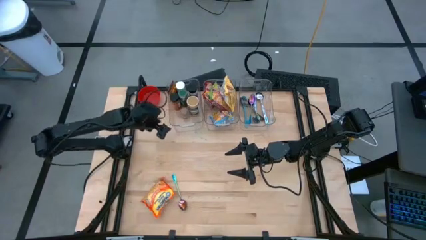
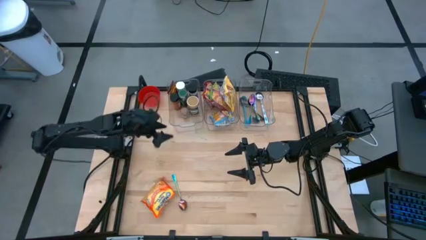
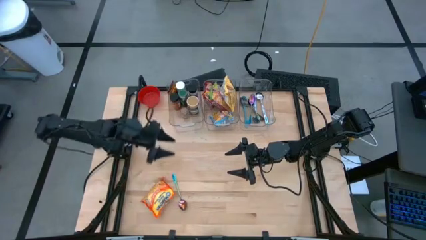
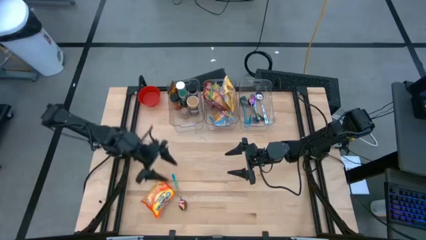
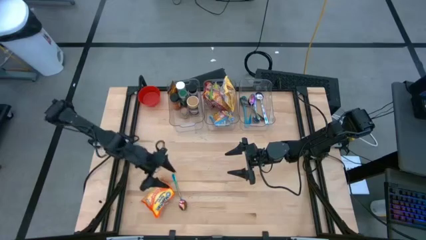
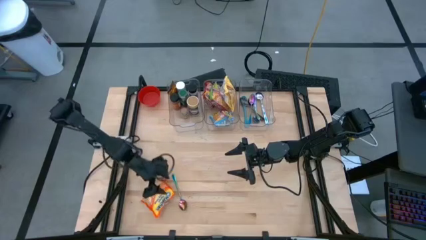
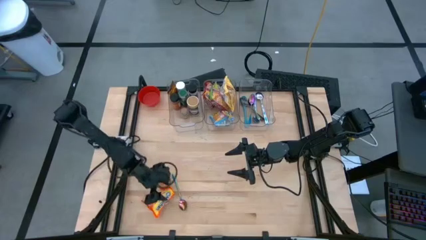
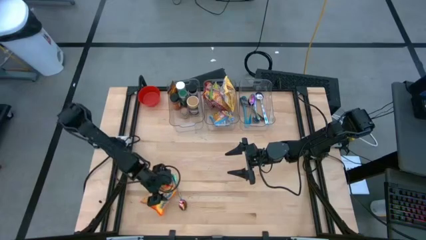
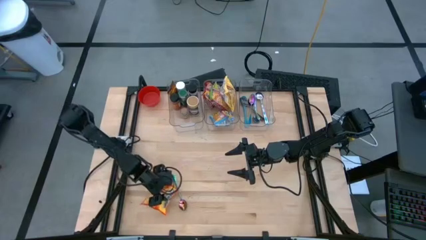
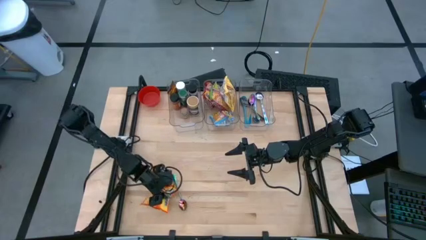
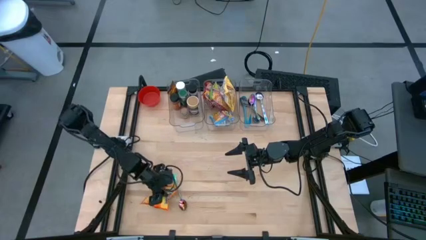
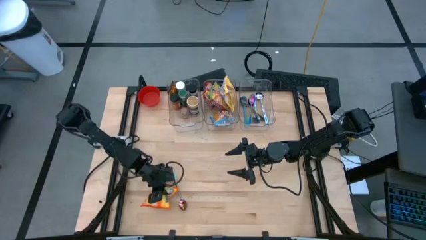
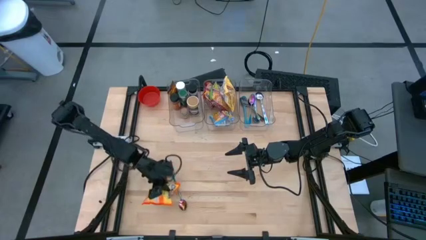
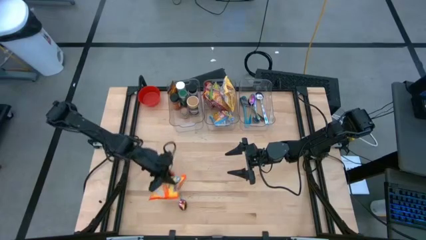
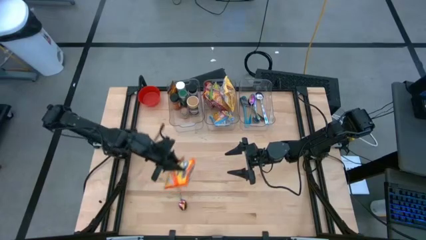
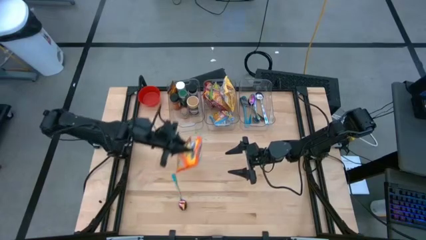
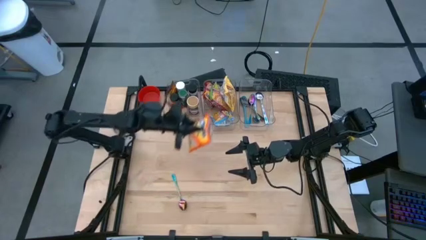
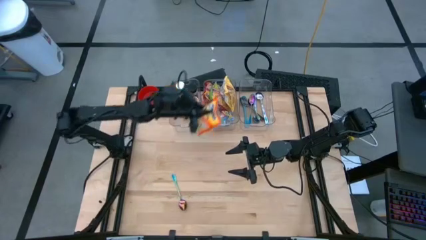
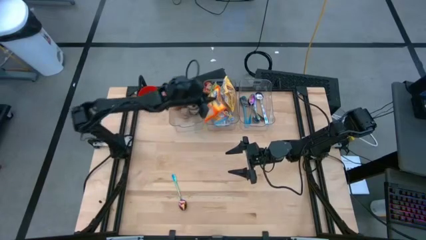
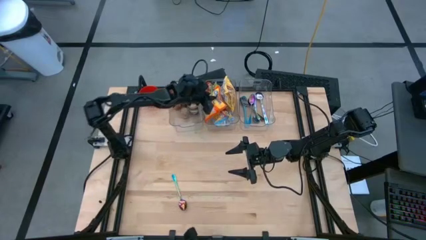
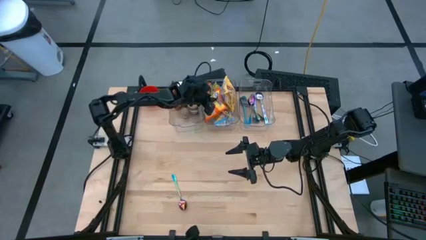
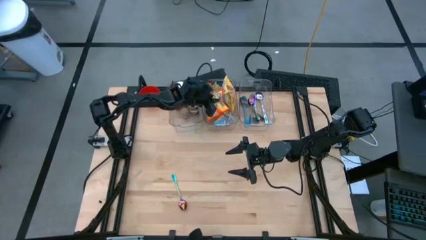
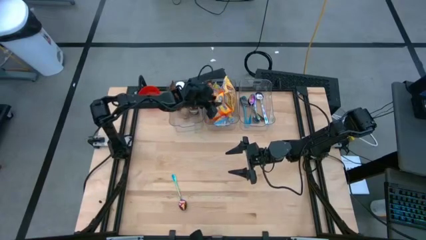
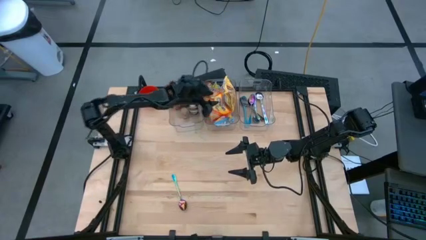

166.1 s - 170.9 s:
Task: Pick & Place Food Item
Put the orange noodle pack into the middle transparent bin

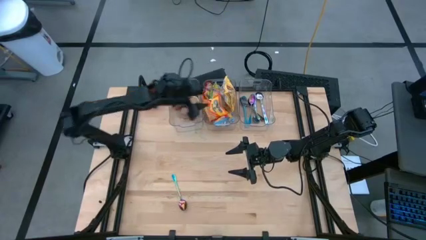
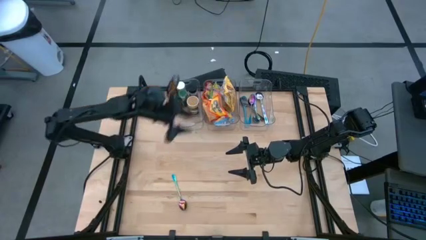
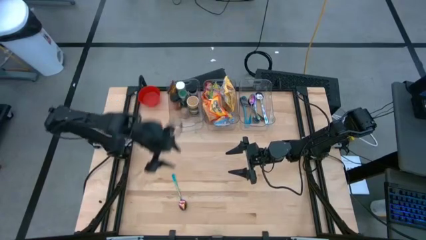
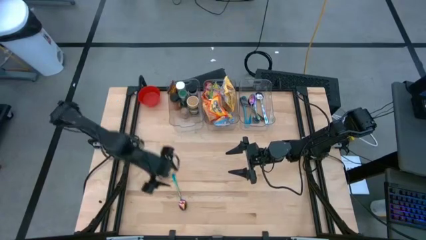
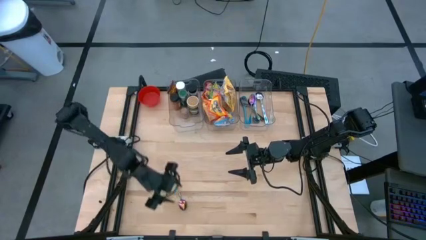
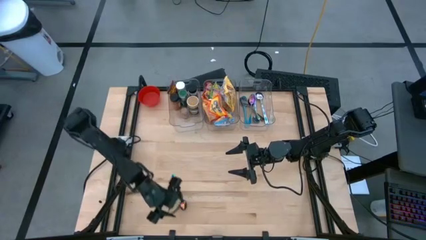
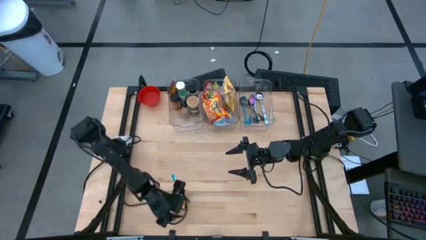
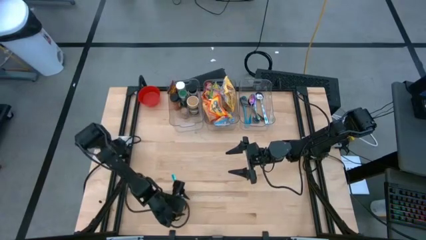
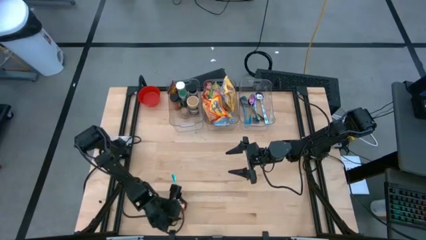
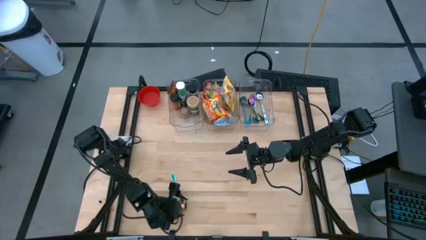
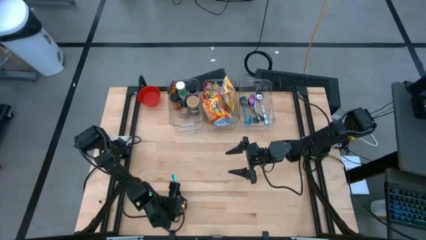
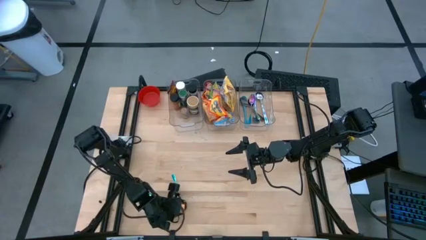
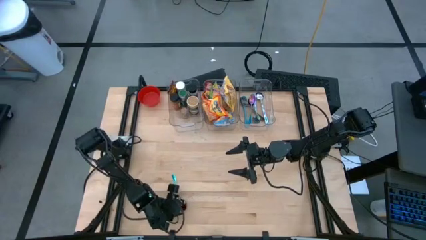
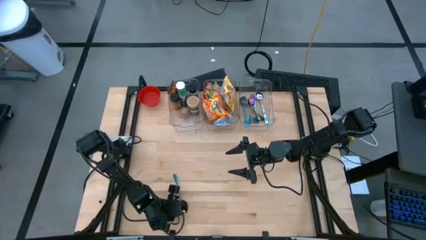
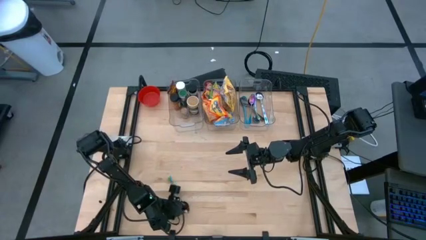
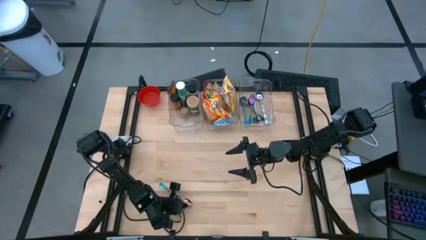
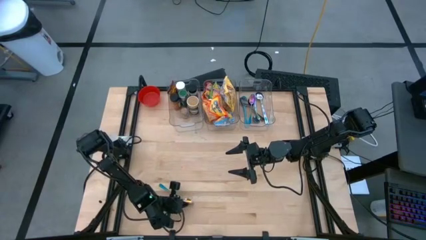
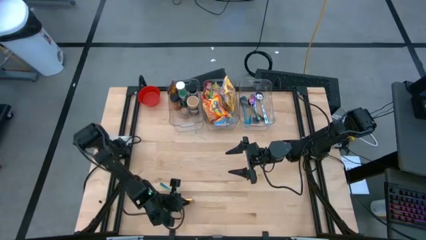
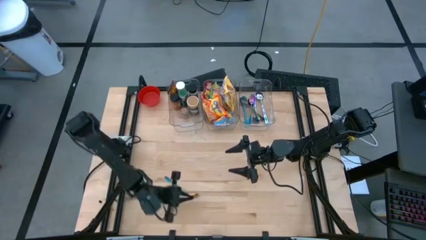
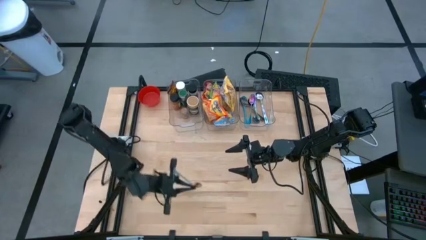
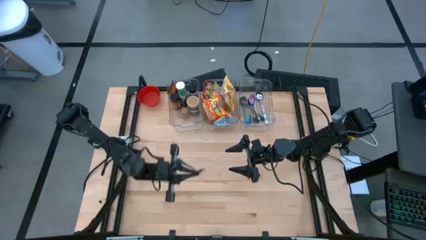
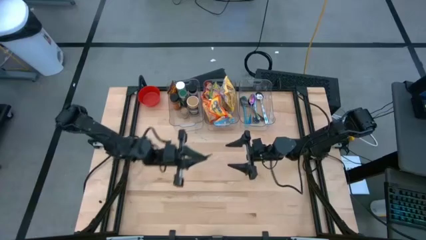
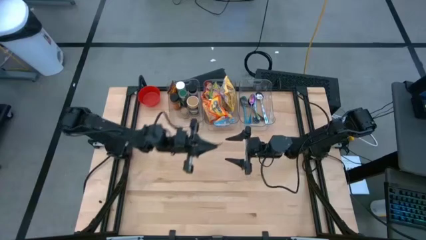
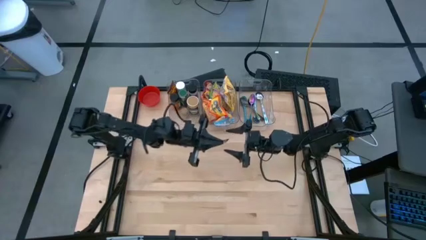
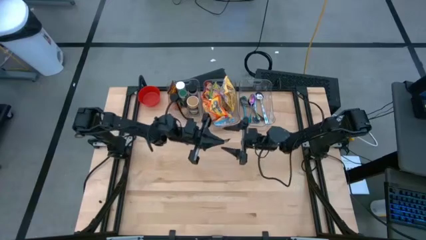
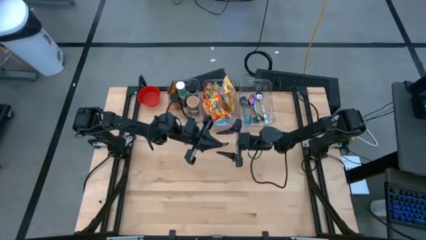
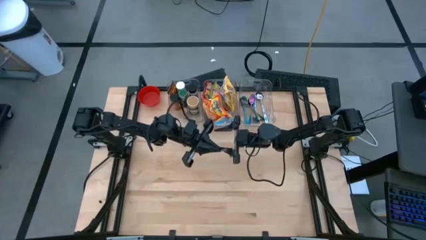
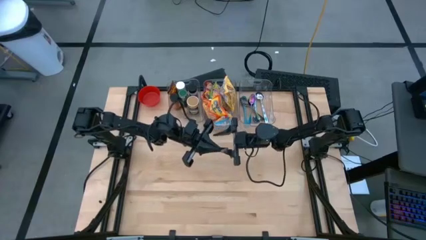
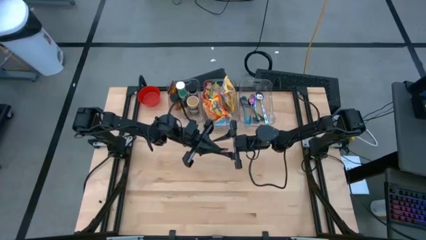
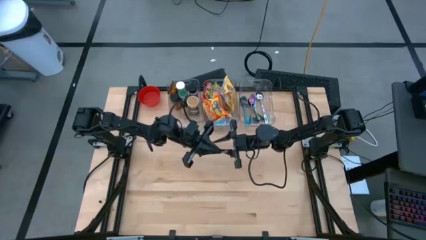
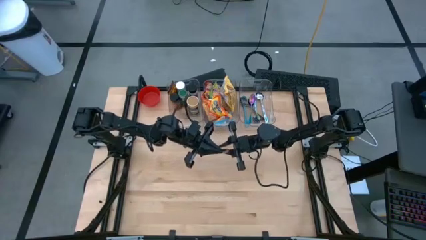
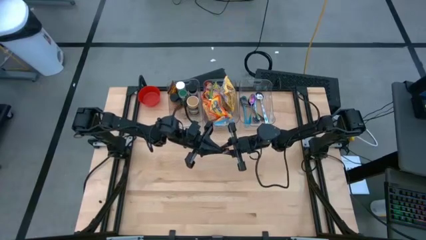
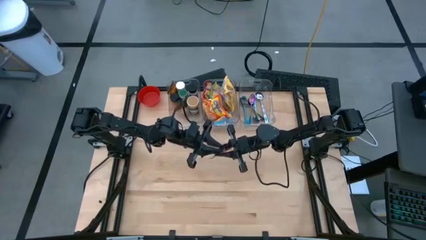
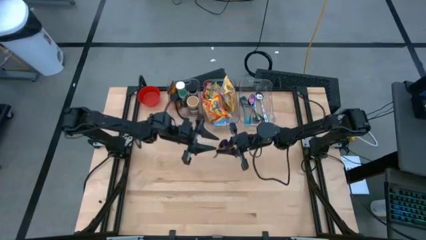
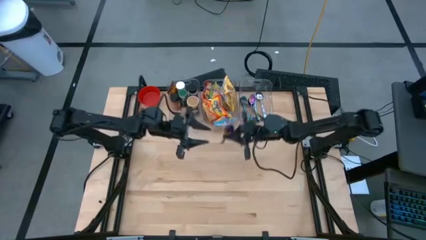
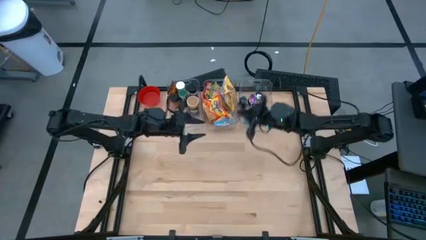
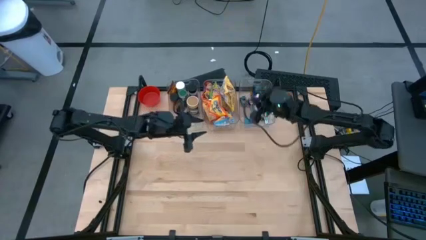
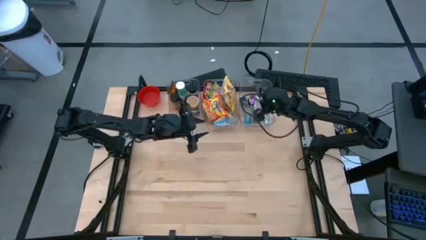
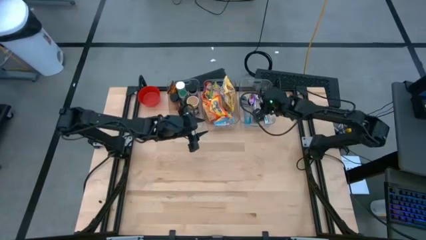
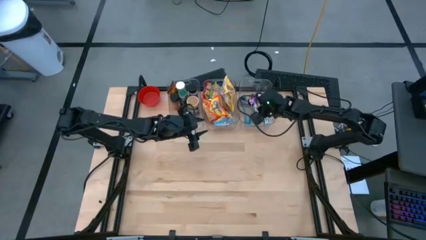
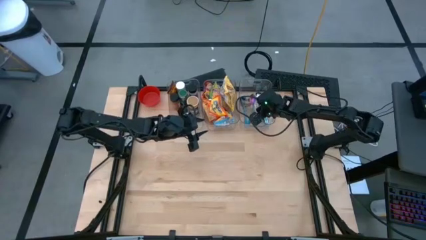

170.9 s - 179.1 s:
Put the blue spoon into the right transparent bin

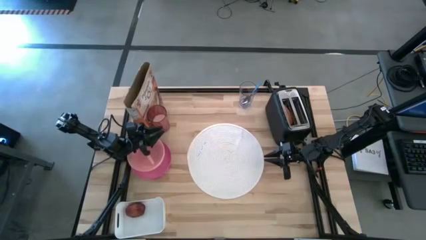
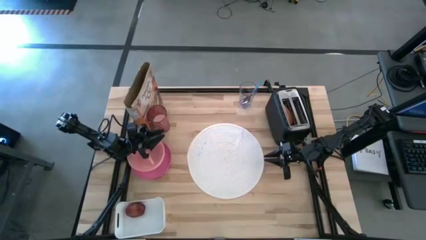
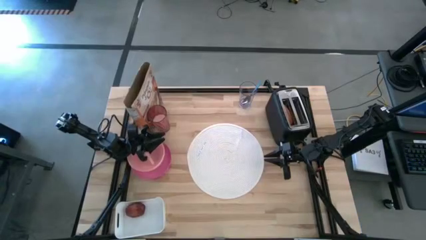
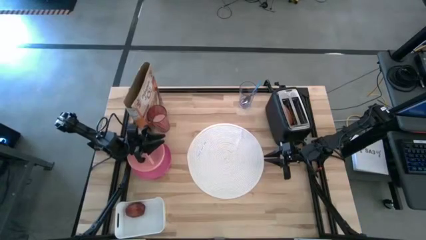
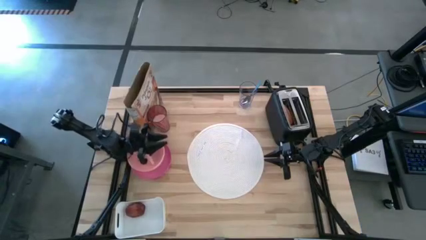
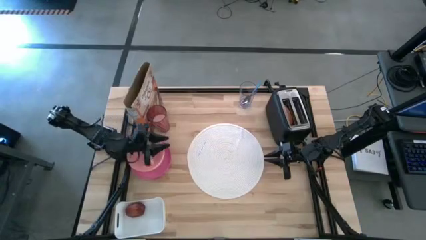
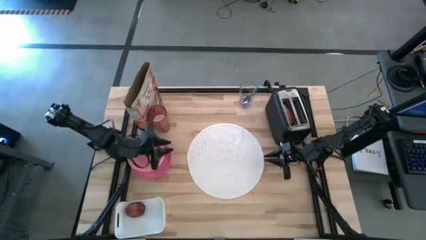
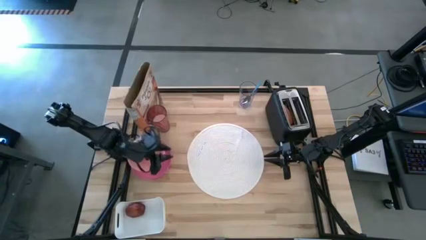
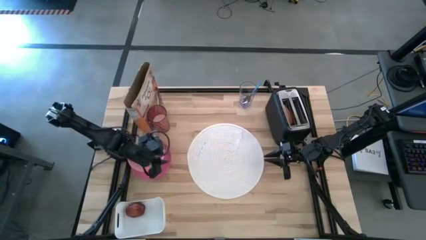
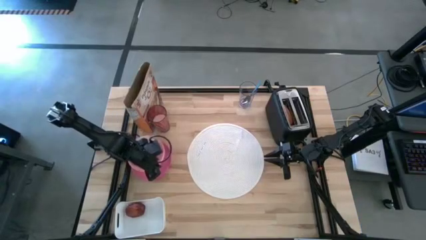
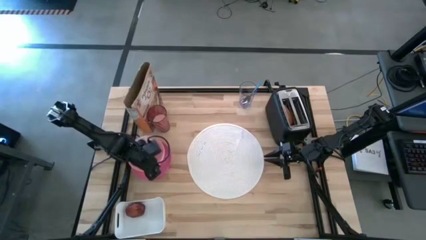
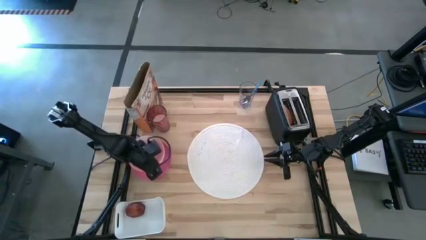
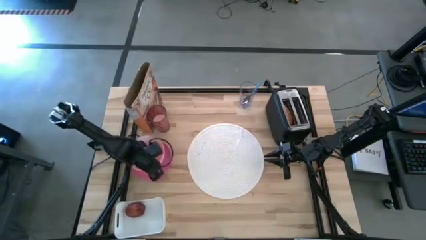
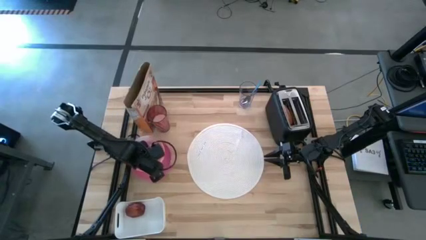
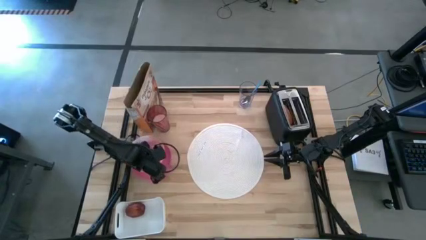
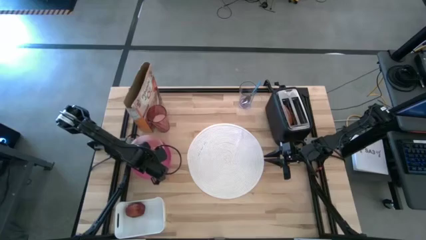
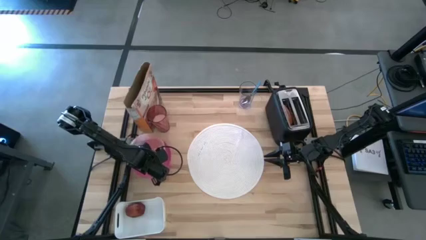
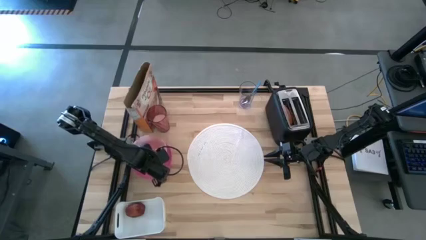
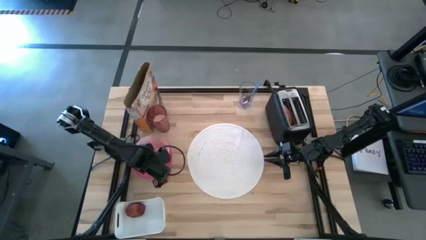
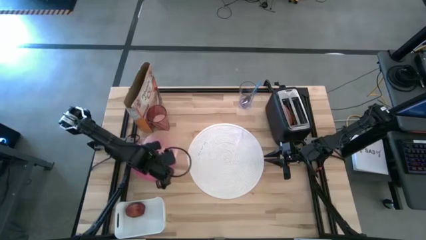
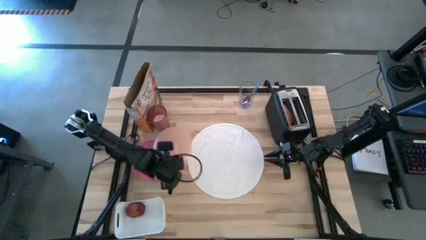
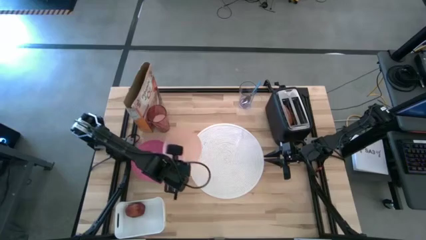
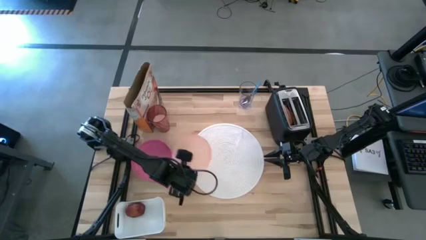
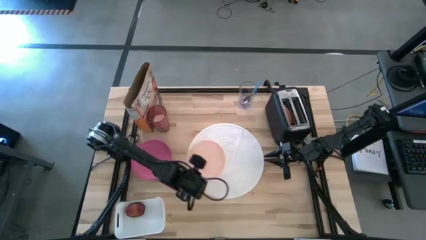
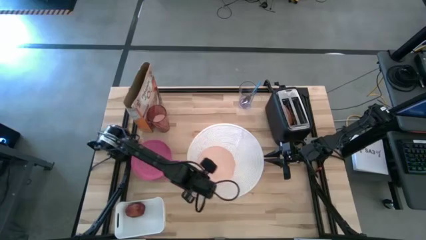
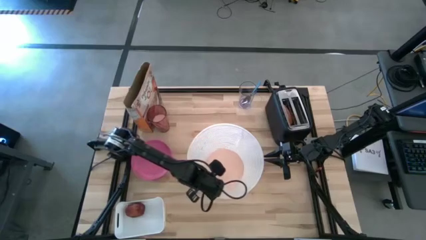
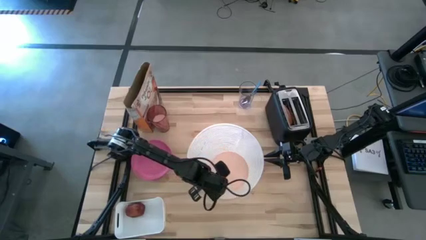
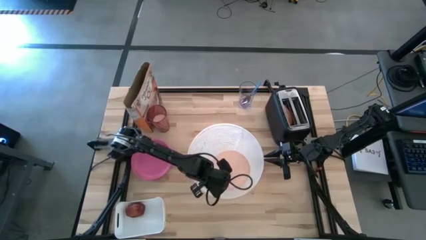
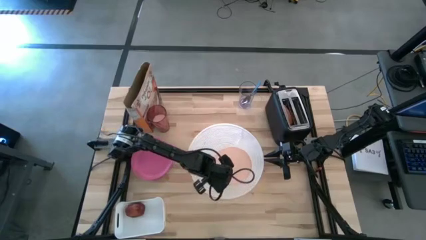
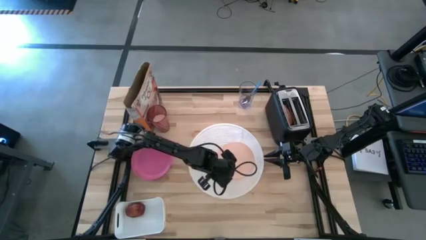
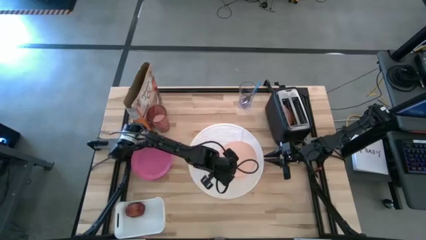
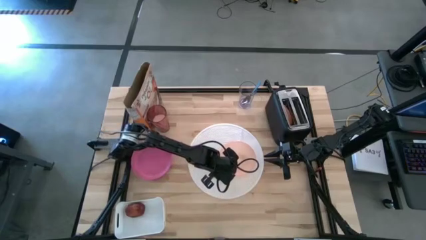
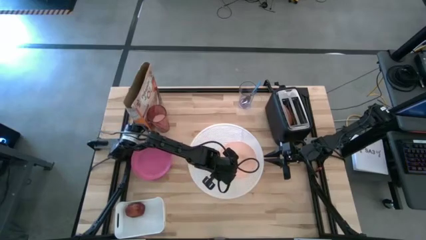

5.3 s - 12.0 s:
Task: Arrange a breakfast setting
Put the light orange bowl on the white table mat
